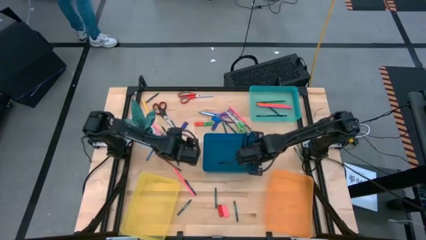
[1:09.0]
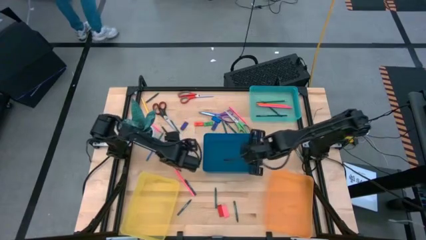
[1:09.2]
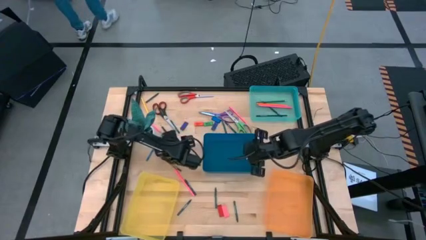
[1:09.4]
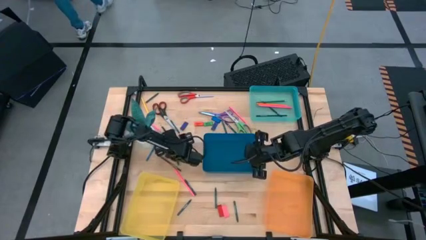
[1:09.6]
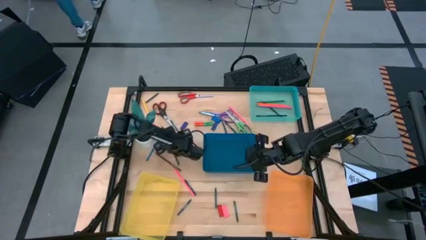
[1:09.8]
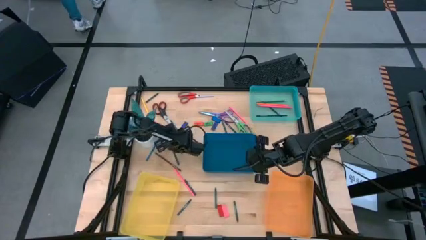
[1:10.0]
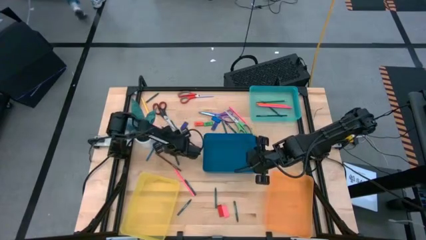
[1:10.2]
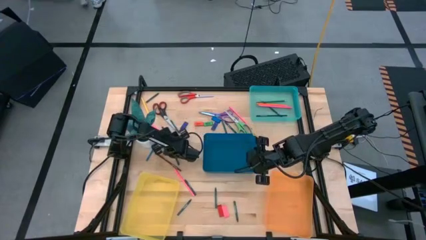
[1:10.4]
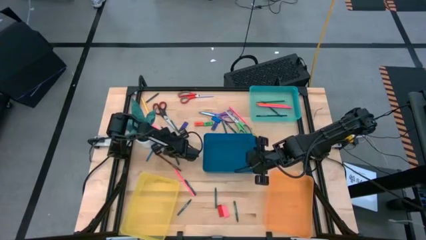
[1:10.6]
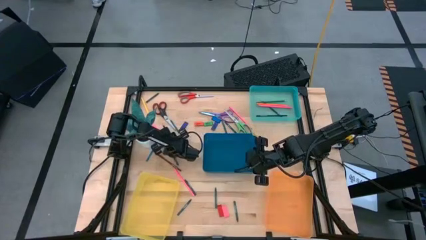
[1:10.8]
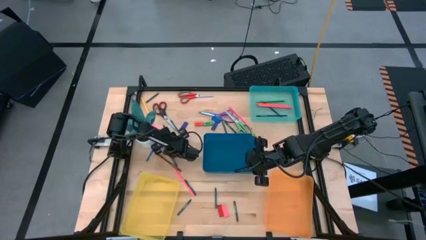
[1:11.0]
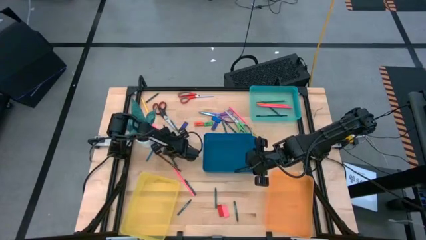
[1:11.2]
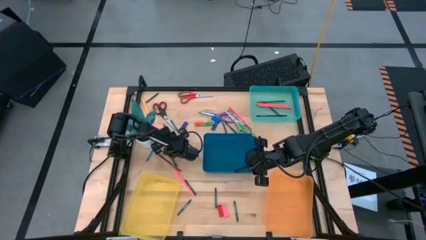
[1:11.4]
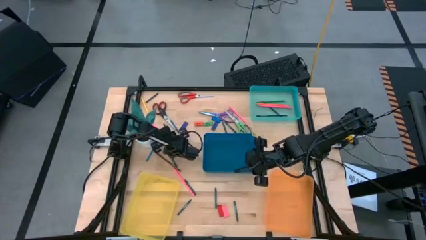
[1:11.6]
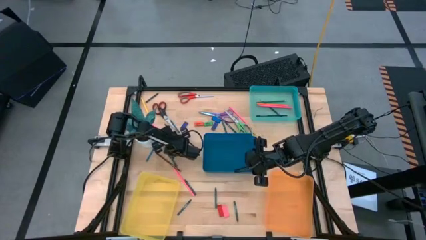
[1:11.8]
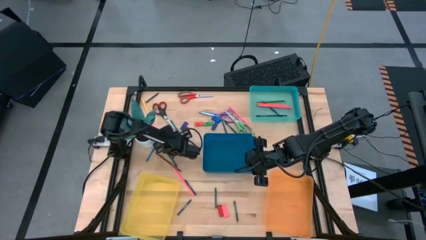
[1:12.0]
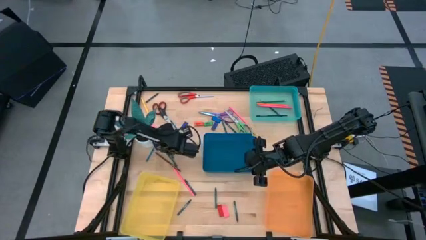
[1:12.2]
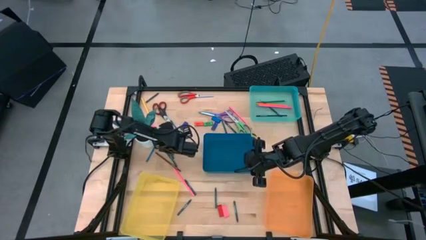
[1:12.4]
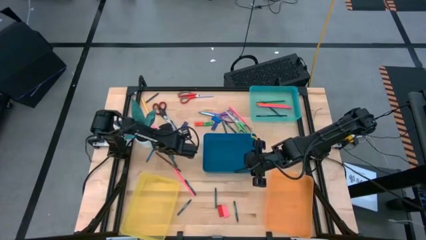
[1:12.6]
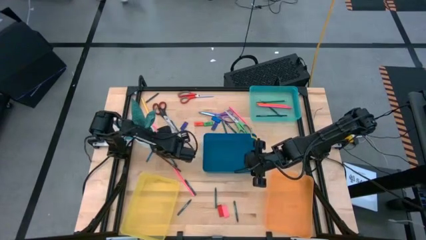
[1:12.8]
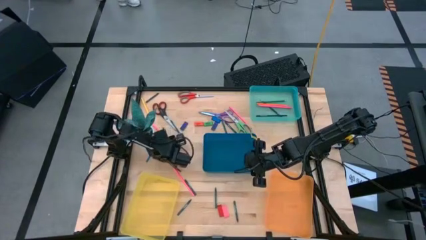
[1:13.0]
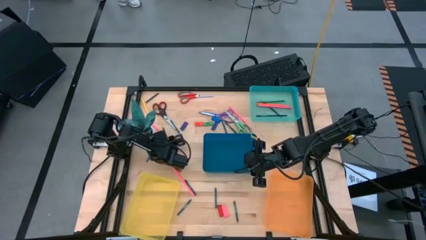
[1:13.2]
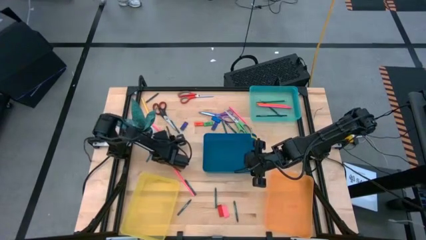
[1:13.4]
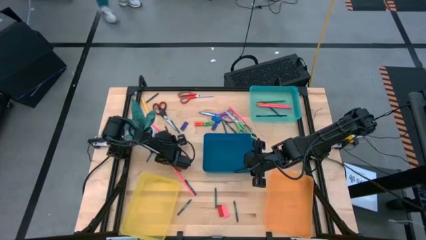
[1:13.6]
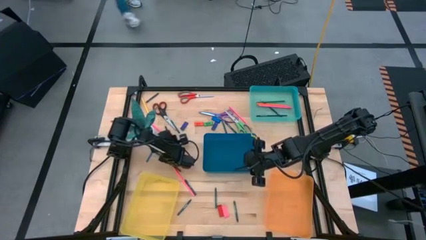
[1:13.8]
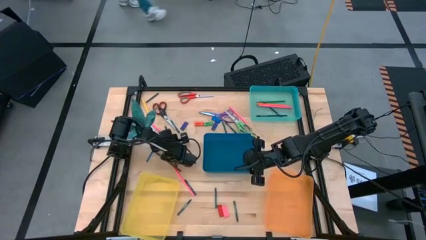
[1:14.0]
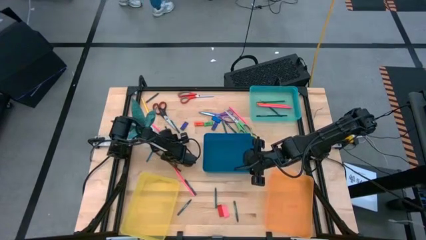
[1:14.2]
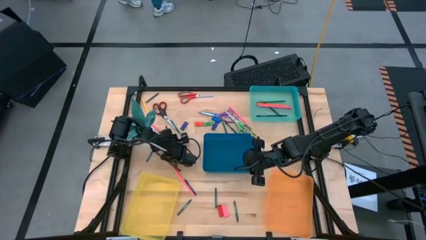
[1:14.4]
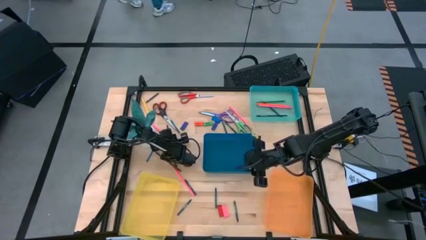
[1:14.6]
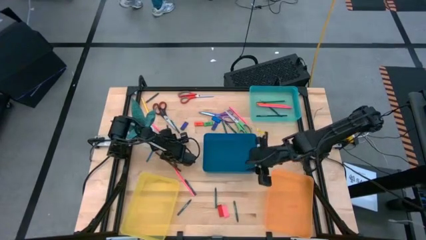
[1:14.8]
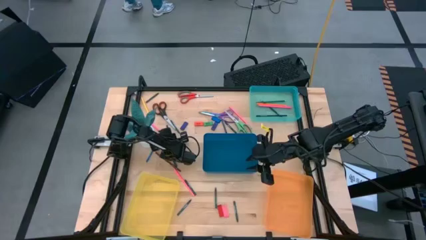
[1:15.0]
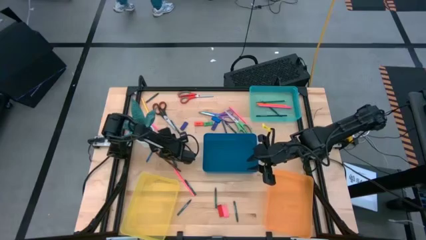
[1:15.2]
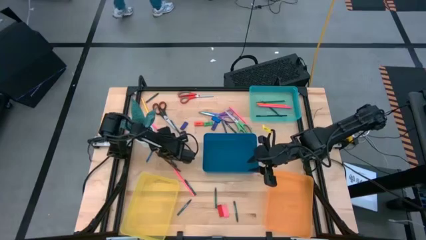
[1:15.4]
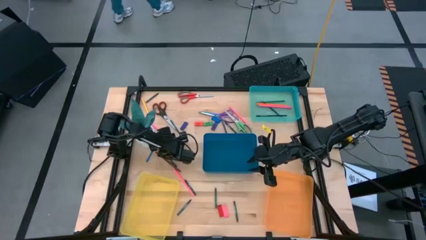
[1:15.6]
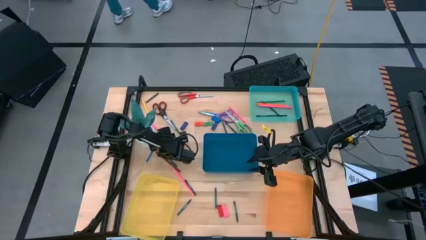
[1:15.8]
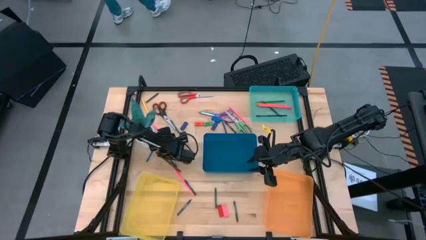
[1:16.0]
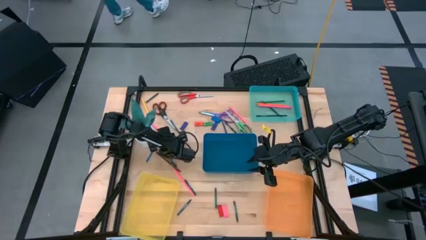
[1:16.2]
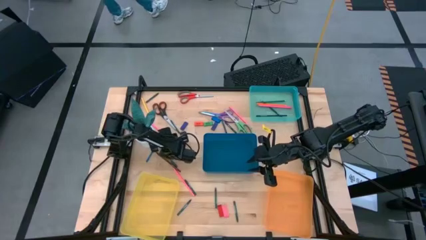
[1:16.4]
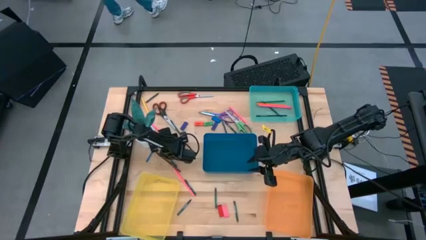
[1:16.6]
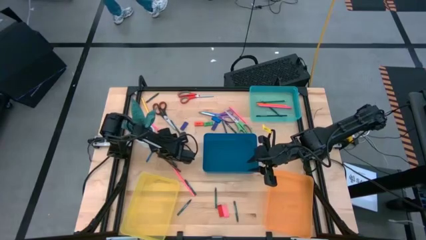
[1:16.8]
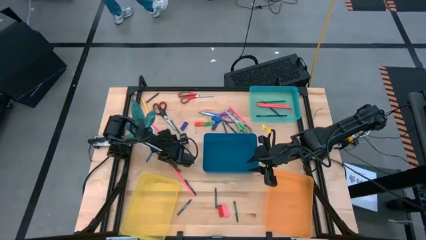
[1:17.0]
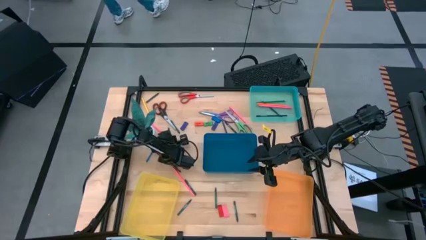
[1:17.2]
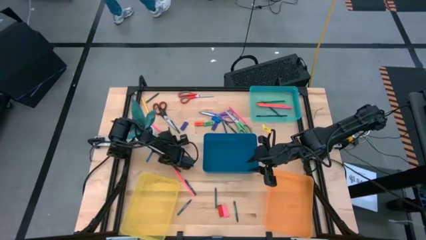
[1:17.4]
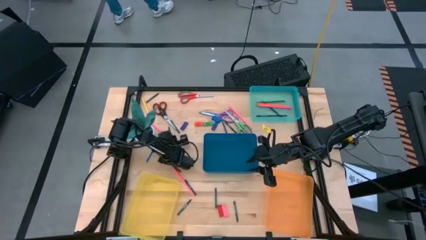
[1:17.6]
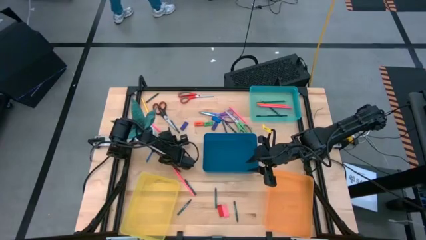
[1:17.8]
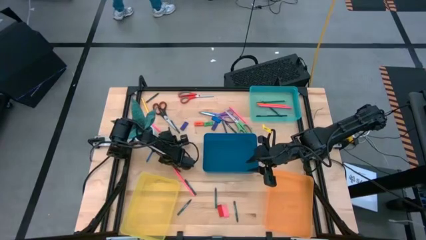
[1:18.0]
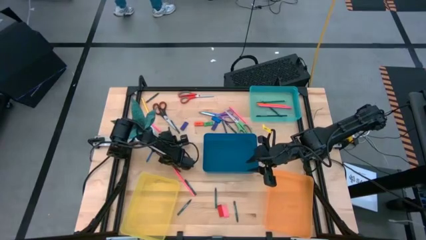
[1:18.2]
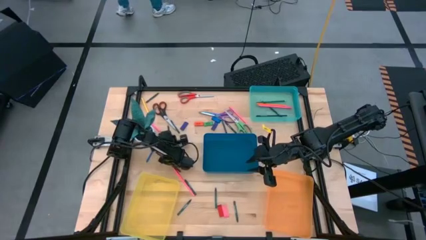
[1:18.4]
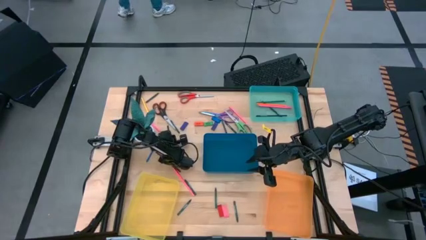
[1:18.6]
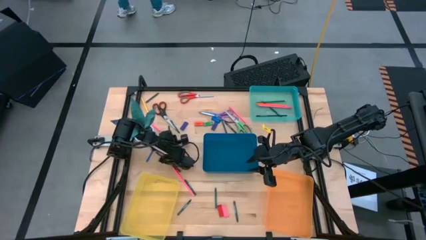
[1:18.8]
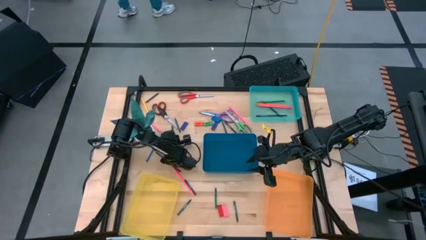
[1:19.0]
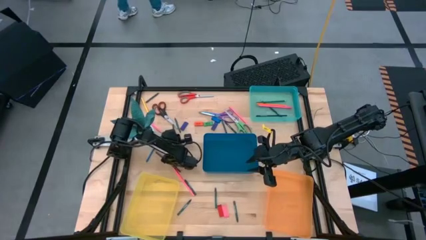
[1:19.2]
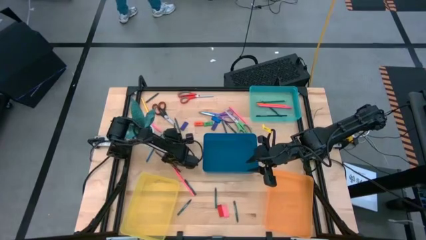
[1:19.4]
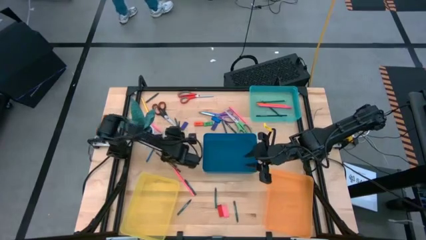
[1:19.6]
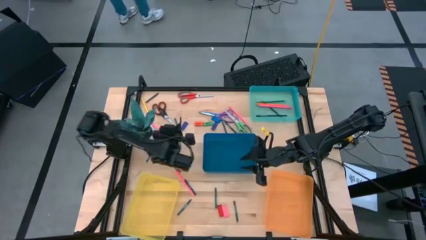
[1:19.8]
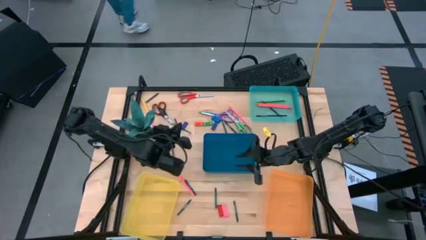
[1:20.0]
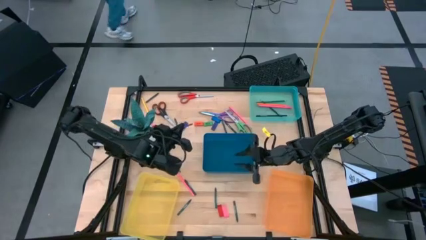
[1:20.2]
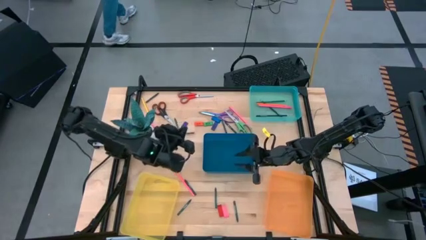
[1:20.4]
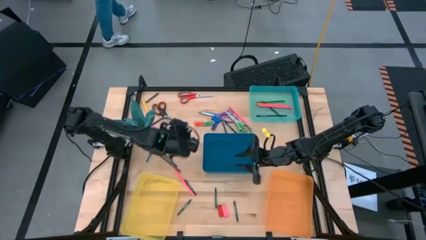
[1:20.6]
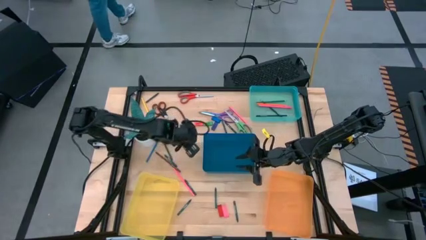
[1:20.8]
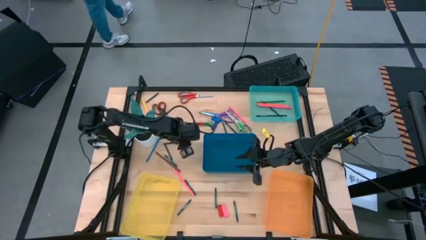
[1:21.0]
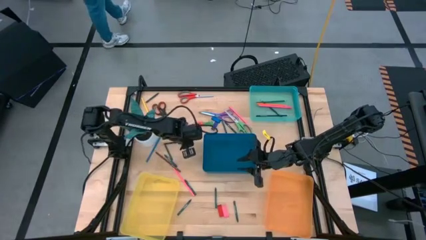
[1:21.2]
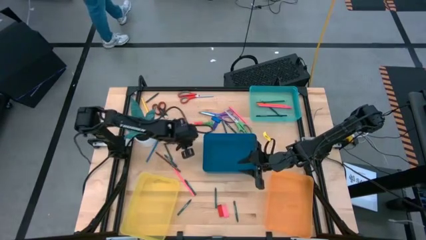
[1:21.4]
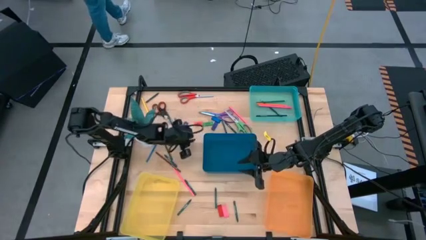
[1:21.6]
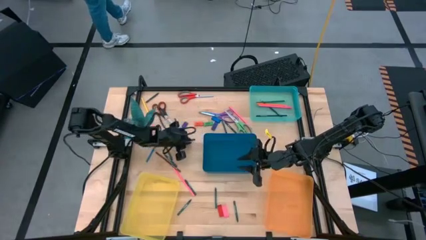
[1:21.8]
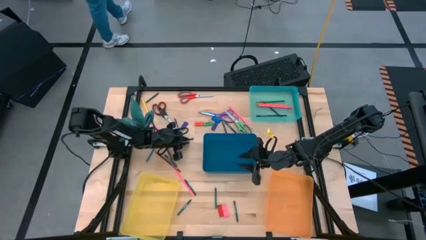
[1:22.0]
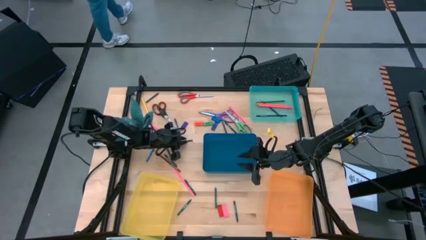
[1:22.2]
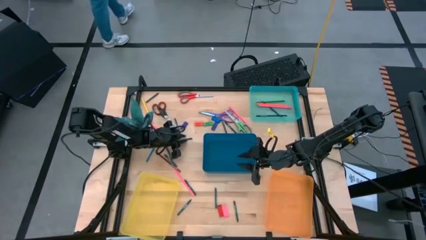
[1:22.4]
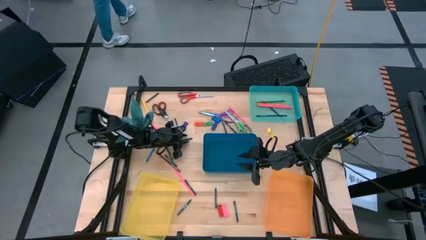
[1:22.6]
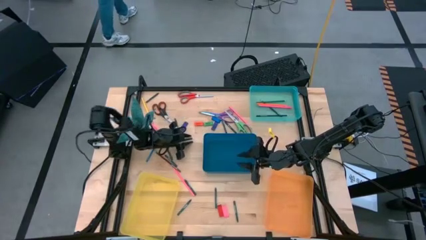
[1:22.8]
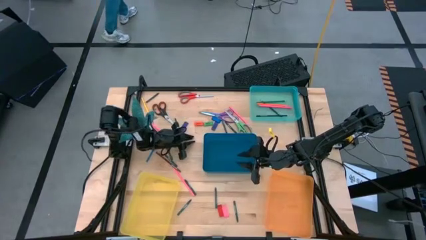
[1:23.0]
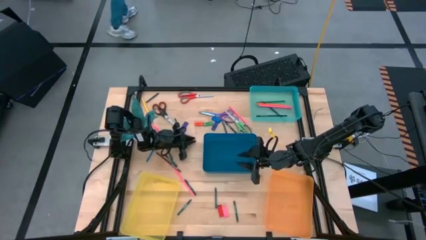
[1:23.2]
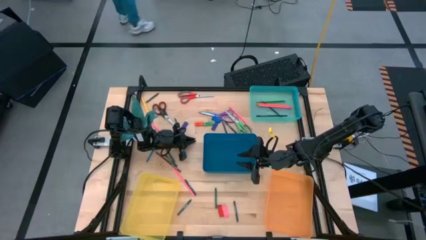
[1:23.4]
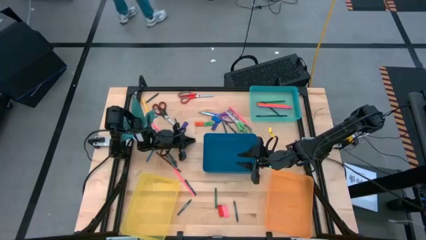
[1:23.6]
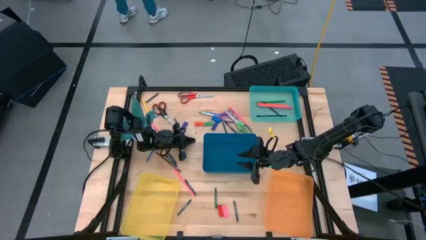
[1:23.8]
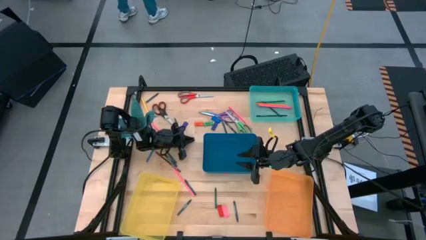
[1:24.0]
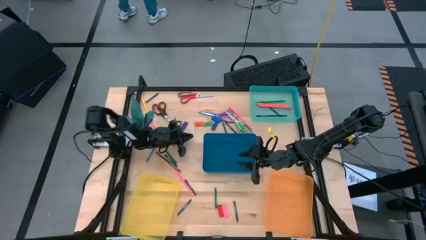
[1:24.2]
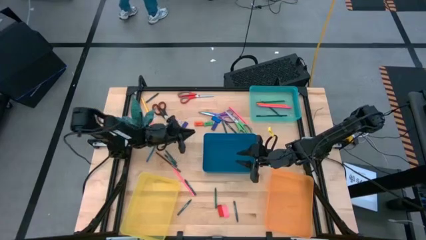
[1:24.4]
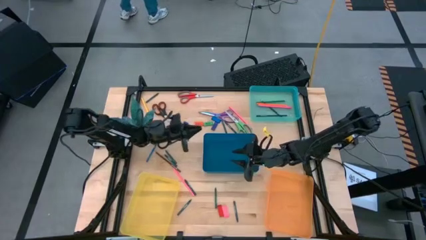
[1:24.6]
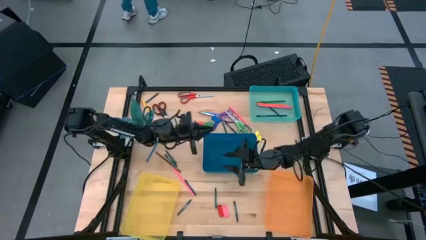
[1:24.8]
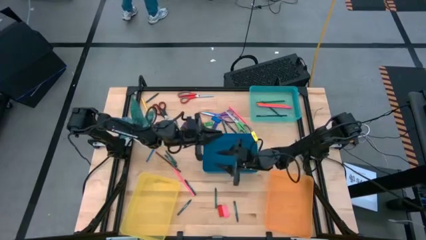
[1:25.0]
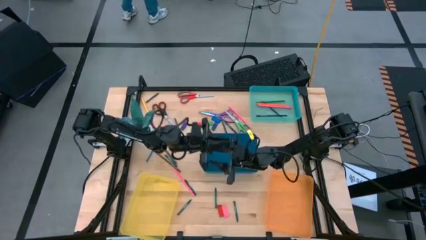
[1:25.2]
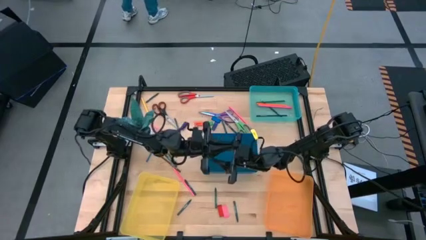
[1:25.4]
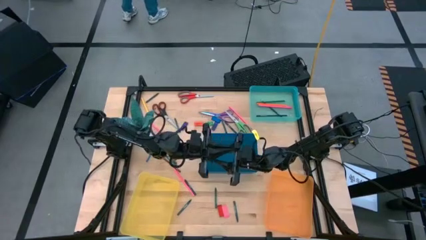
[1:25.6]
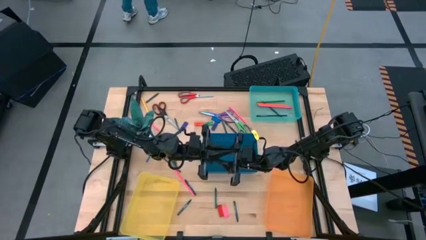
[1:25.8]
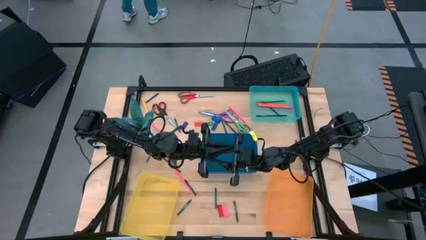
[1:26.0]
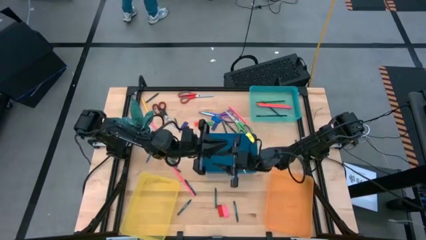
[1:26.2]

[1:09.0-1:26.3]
Task: Sort crayons/erasers/pens/pencils in bins
Put the dark blue pencil into the green bin
